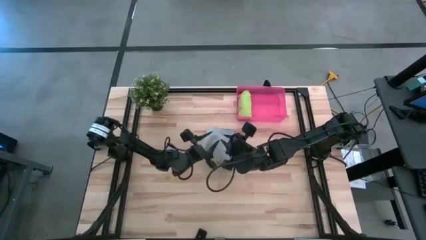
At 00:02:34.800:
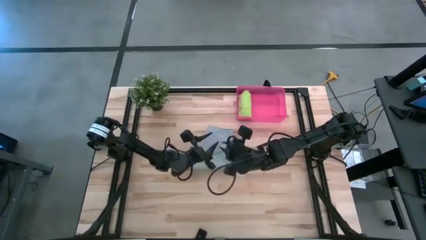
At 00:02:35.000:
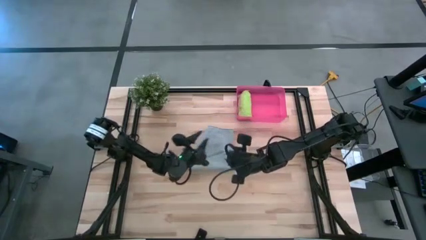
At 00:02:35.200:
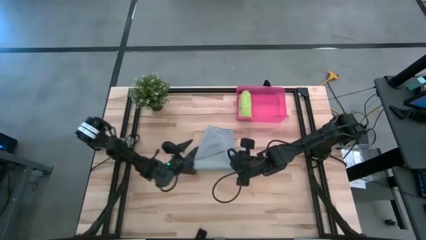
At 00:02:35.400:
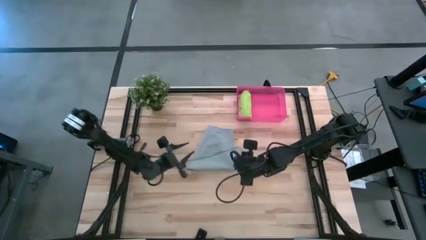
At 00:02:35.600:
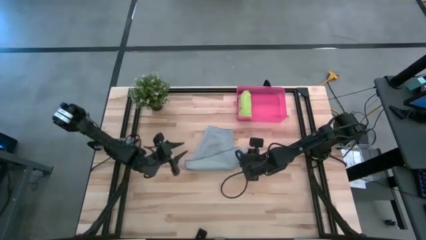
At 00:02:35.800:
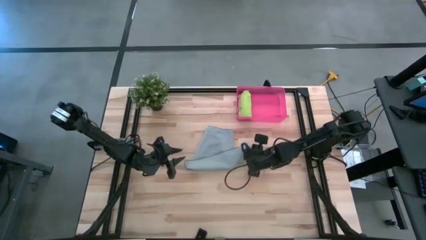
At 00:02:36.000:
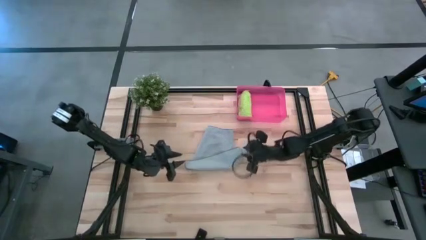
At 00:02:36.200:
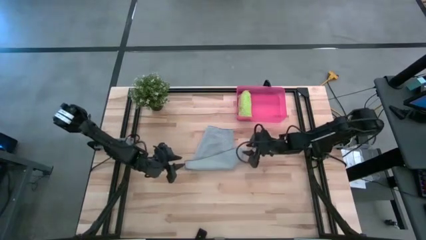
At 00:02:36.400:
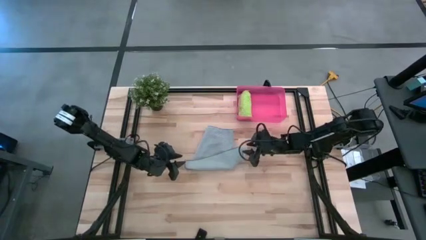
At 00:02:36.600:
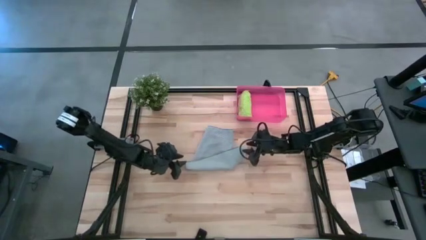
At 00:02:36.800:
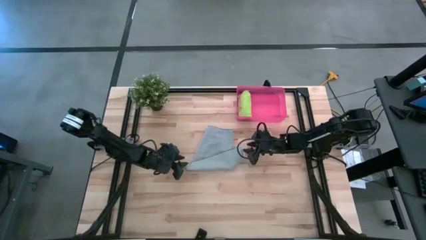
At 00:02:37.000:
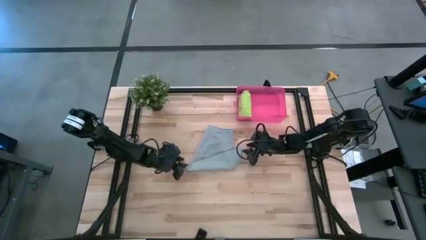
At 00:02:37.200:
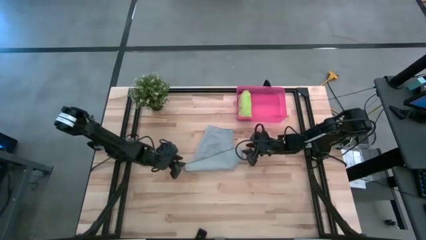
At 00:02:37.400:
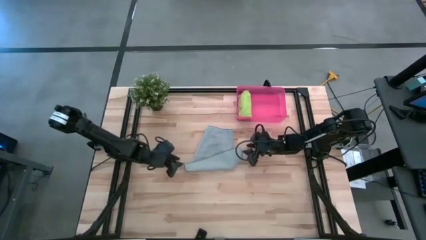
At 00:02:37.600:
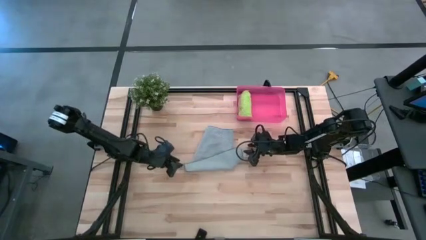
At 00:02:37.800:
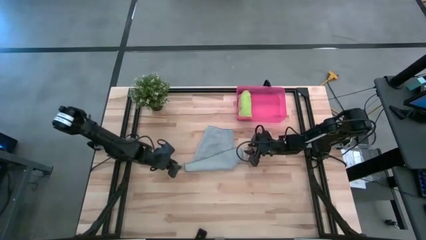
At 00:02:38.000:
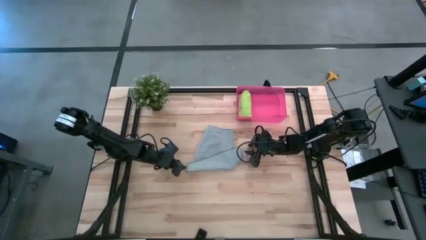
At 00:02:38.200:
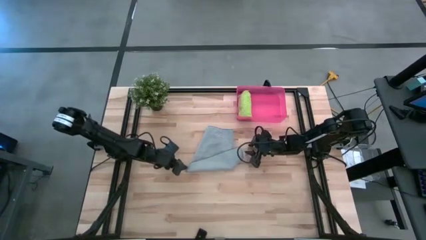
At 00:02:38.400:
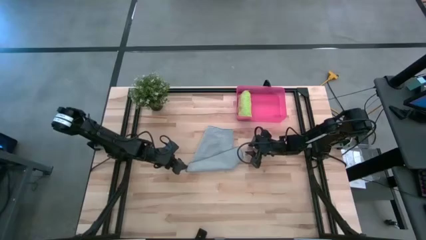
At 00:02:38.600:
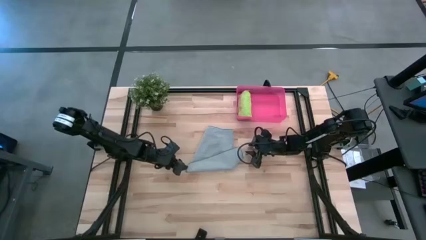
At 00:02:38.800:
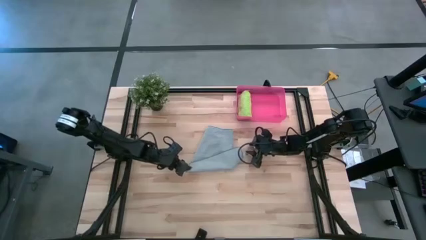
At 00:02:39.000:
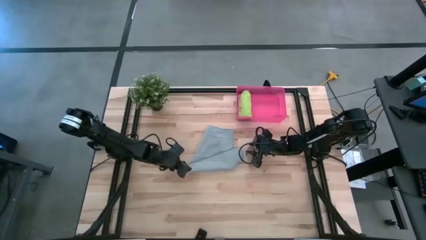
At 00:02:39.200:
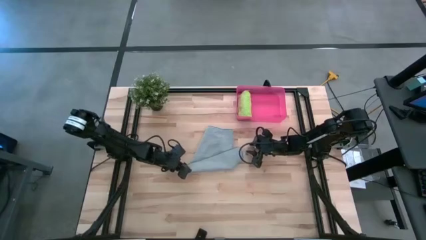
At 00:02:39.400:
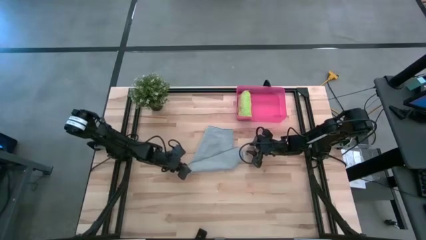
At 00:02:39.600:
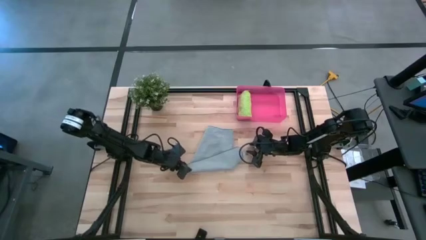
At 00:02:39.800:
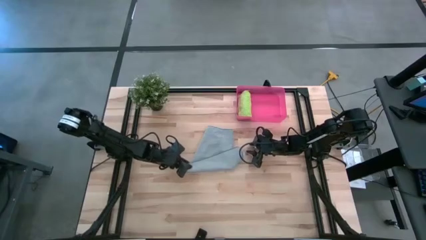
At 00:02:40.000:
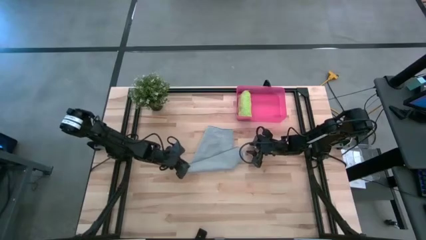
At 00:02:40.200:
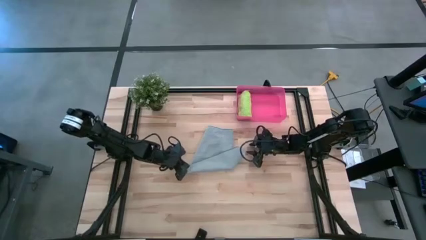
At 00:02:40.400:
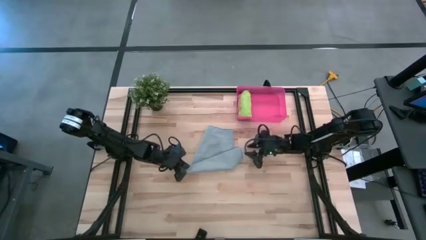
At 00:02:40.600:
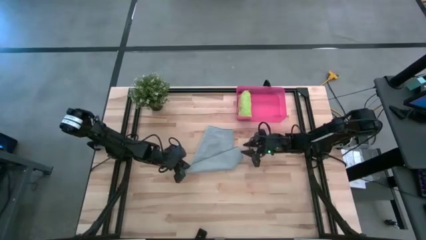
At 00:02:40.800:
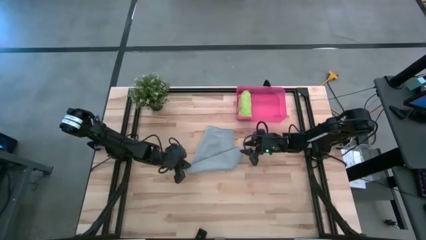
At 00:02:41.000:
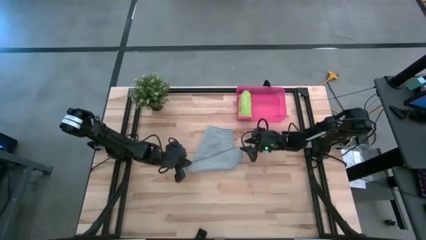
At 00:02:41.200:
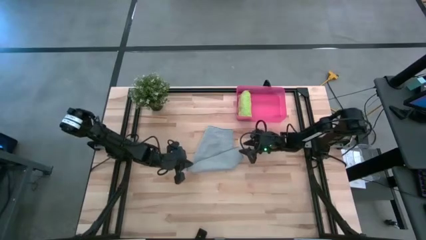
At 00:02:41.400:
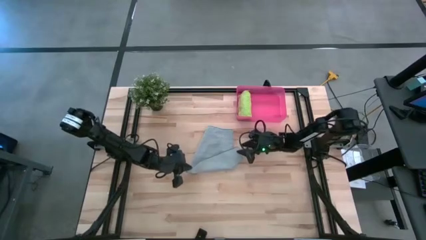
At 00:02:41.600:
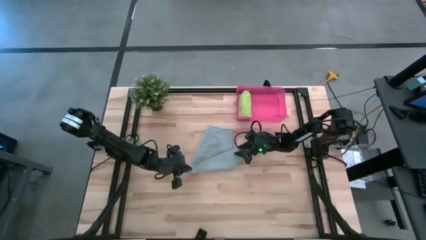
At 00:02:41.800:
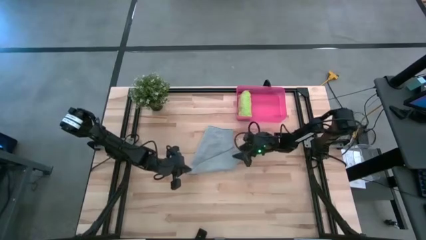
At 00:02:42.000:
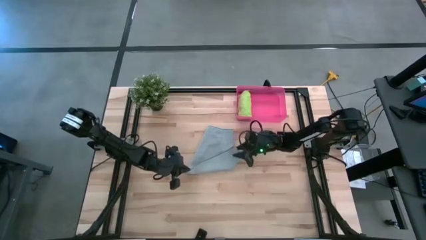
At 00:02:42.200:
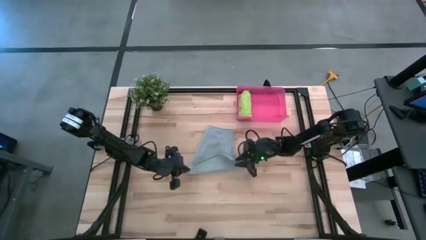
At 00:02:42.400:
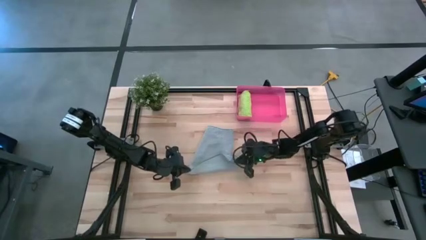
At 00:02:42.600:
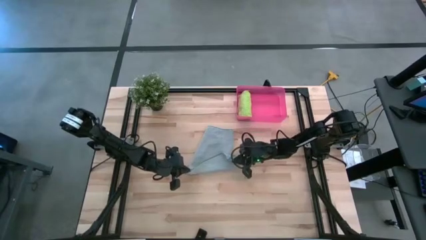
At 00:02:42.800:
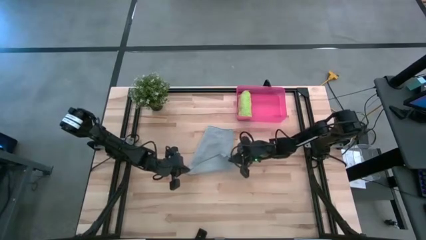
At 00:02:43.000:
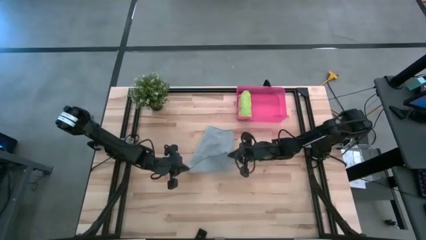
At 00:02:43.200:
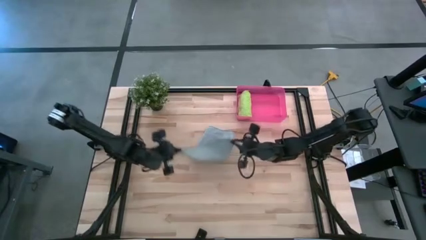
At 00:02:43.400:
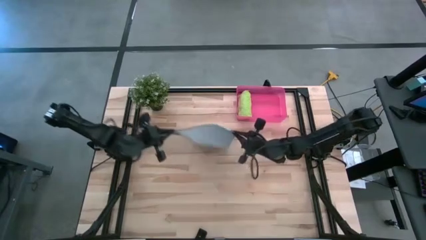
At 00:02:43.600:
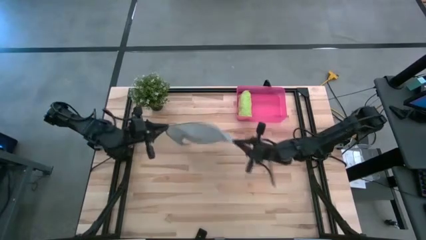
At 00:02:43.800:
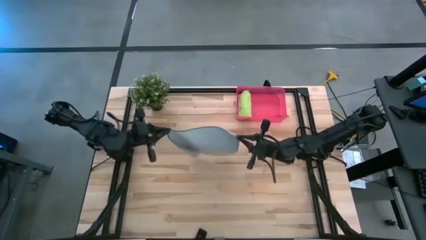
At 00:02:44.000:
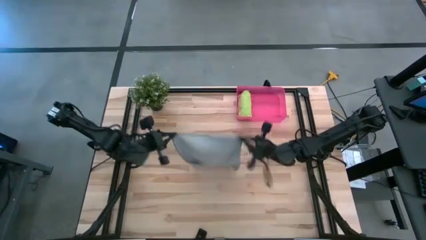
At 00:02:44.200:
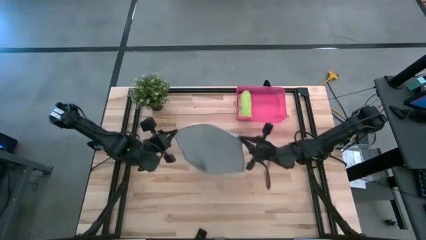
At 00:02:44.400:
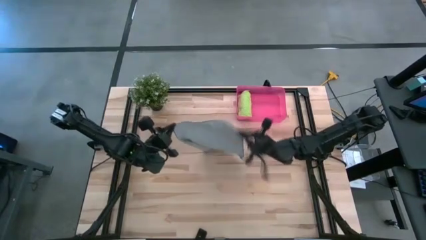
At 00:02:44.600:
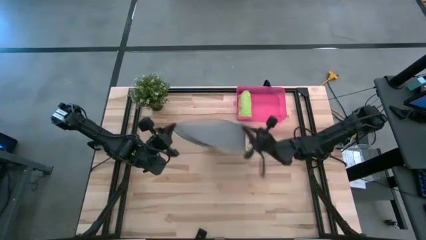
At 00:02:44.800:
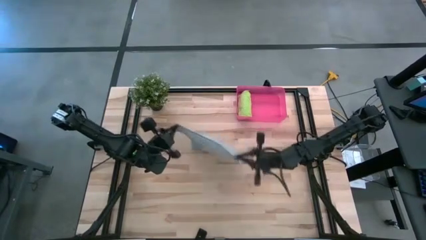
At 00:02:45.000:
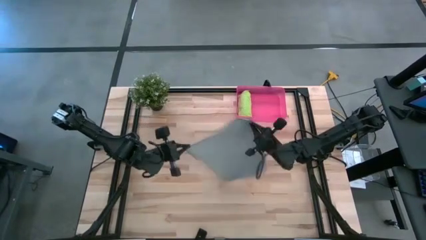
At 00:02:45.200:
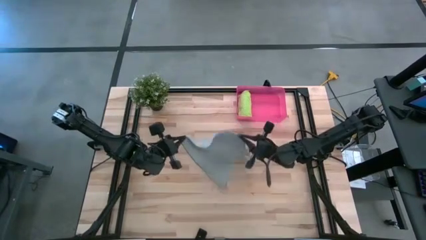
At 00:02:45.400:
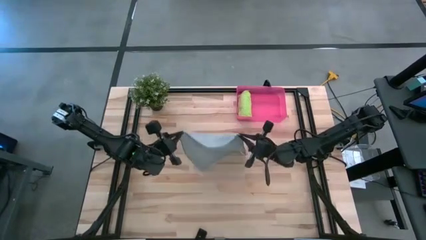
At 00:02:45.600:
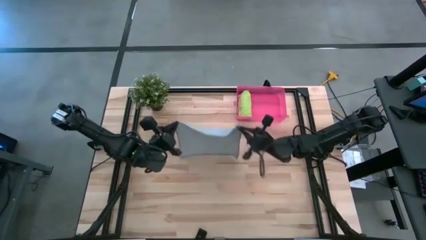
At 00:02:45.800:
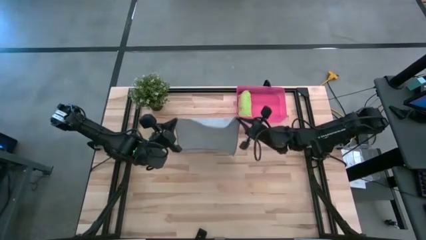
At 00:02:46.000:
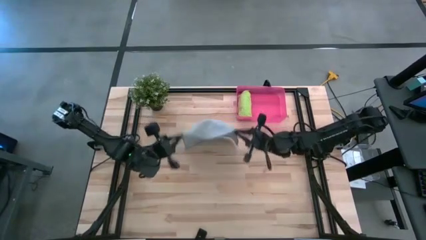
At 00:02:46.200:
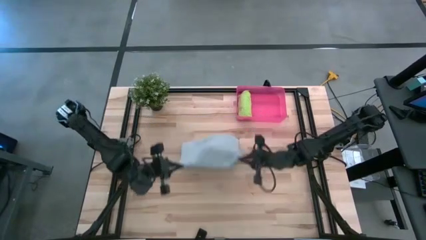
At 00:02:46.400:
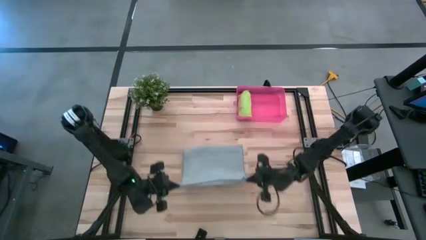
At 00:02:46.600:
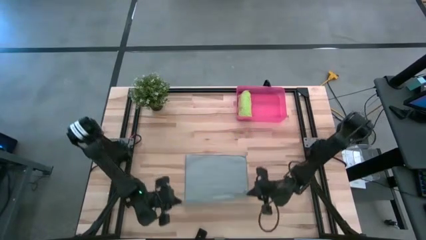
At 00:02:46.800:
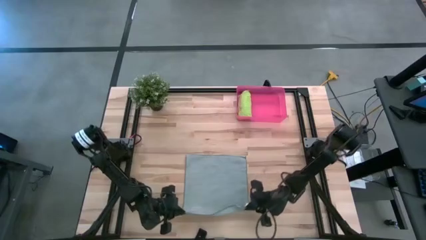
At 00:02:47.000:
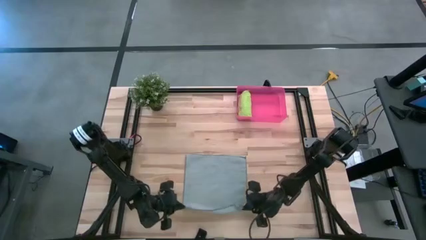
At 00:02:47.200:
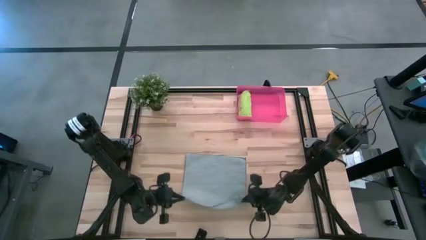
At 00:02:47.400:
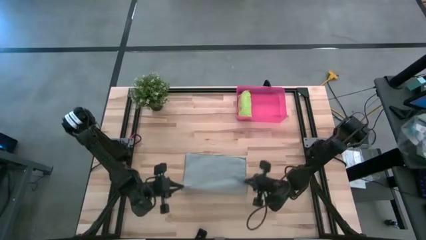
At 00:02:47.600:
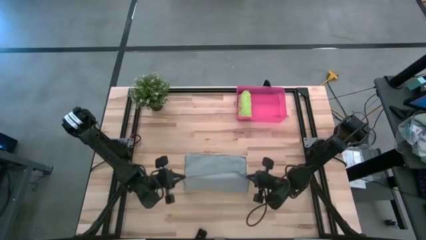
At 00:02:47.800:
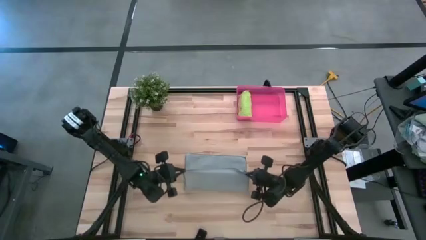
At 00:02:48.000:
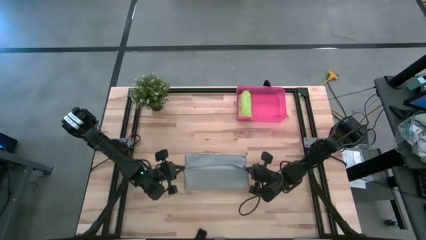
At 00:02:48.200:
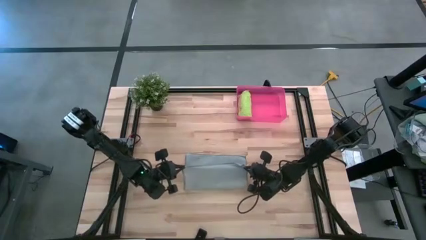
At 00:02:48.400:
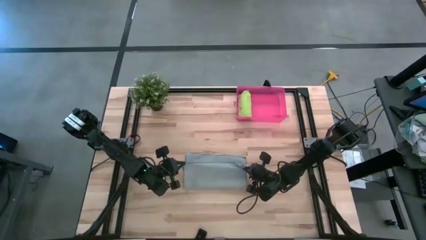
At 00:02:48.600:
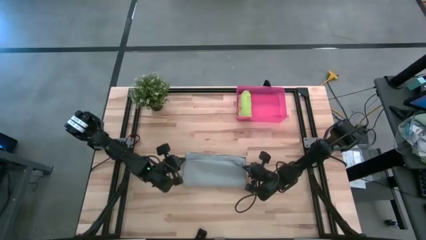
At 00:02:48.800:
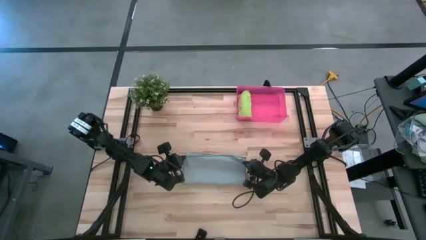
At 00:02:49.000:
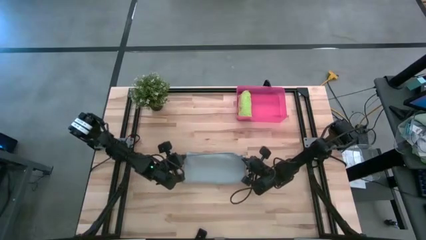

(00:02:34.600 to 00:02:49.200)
Task: Roll microfiber towels into tight, uniform cylinder then place into a basket
Fold the gray microfiber cloth
